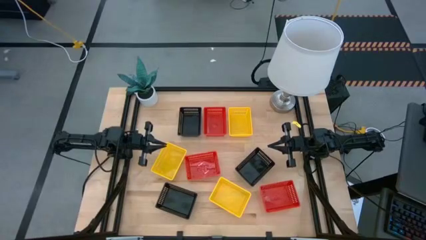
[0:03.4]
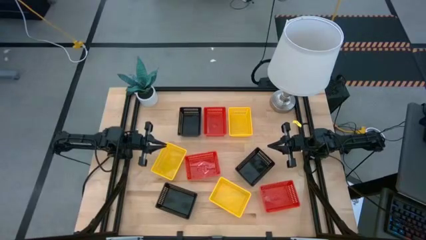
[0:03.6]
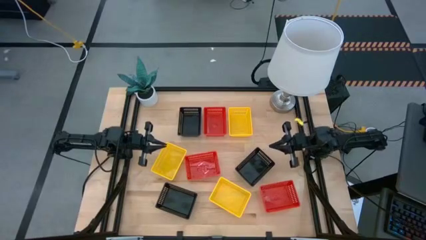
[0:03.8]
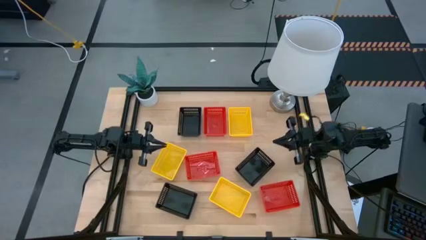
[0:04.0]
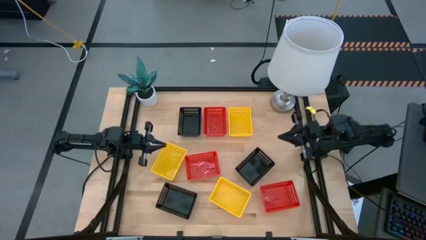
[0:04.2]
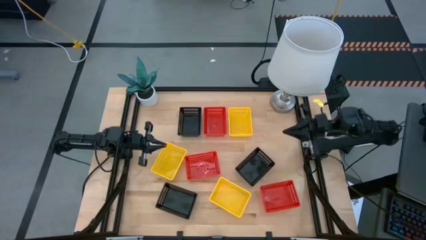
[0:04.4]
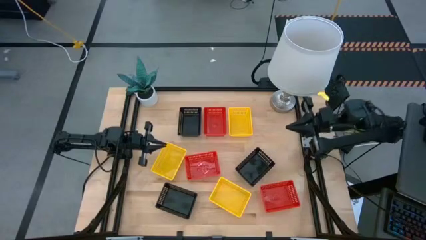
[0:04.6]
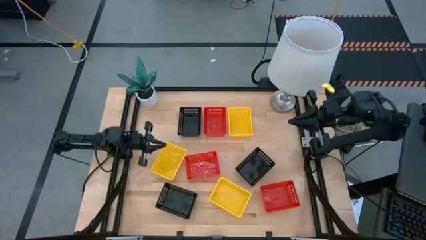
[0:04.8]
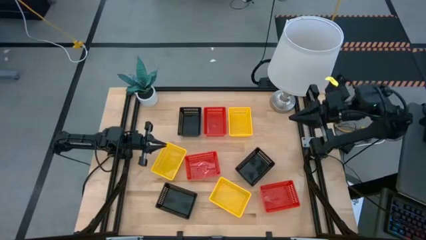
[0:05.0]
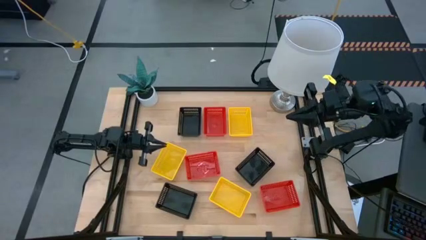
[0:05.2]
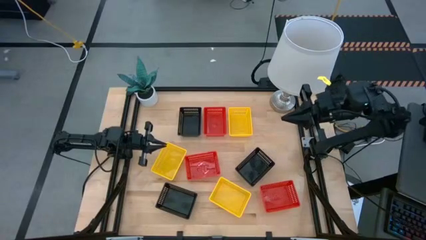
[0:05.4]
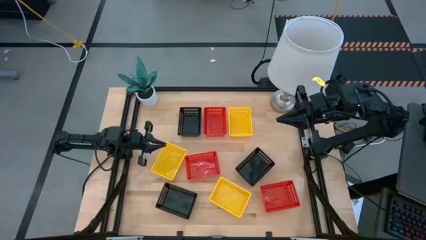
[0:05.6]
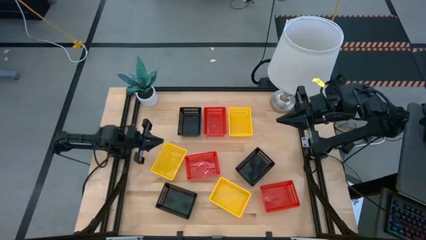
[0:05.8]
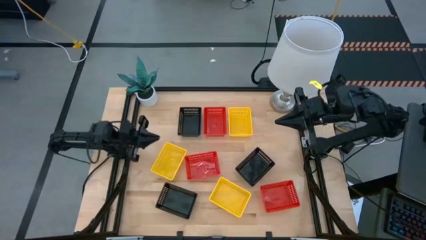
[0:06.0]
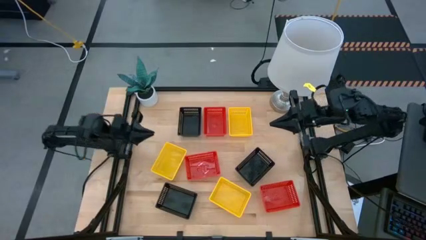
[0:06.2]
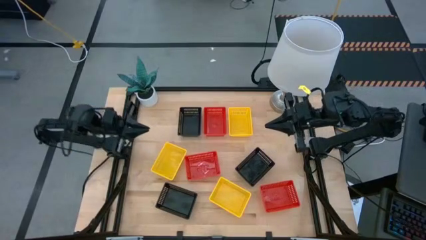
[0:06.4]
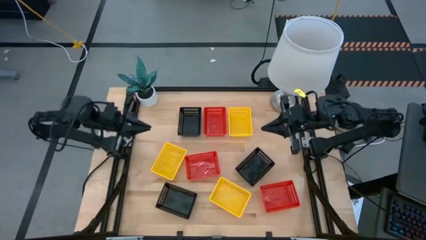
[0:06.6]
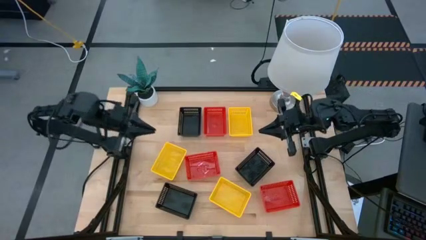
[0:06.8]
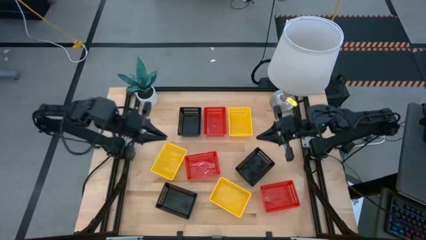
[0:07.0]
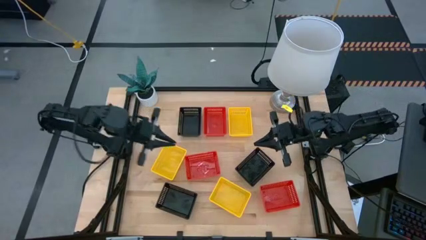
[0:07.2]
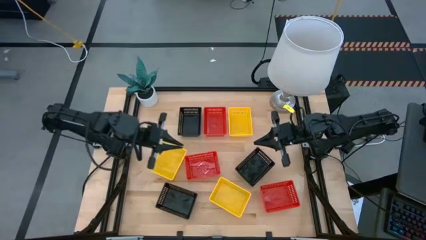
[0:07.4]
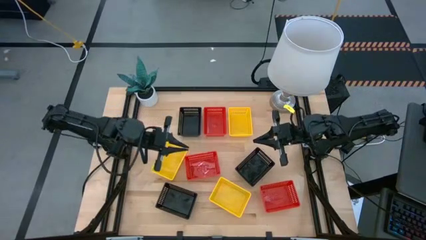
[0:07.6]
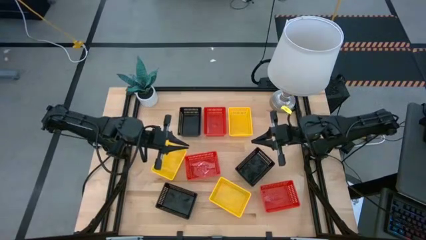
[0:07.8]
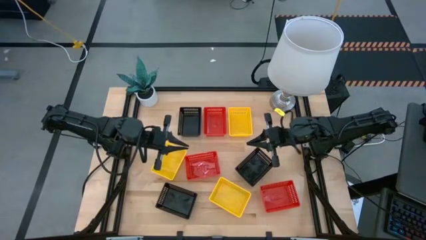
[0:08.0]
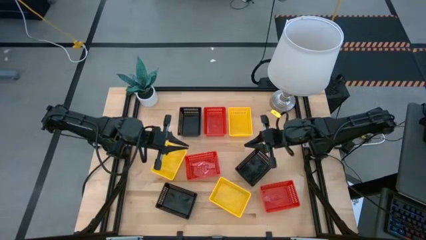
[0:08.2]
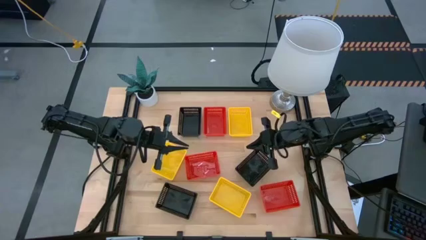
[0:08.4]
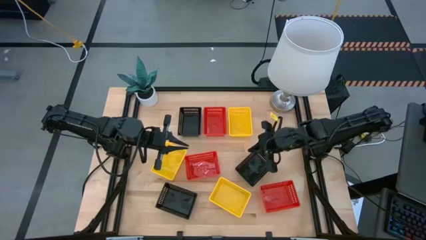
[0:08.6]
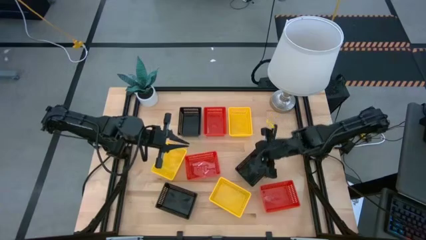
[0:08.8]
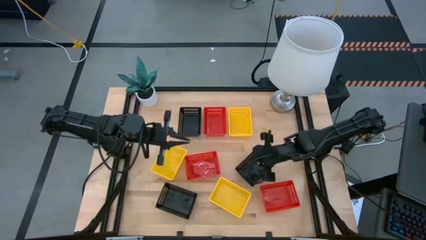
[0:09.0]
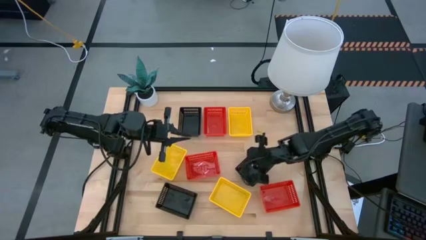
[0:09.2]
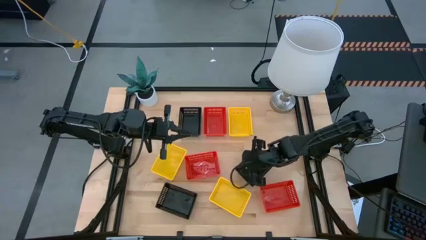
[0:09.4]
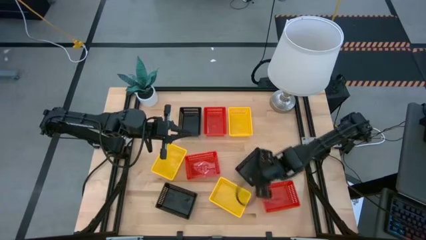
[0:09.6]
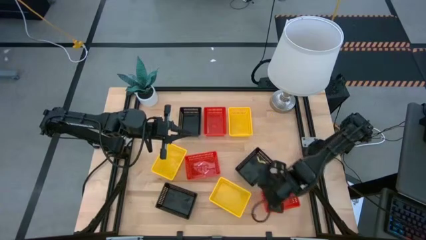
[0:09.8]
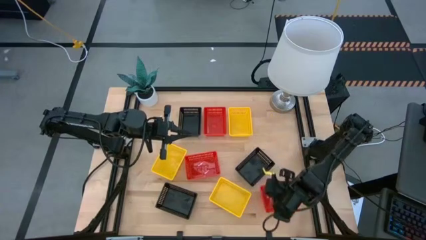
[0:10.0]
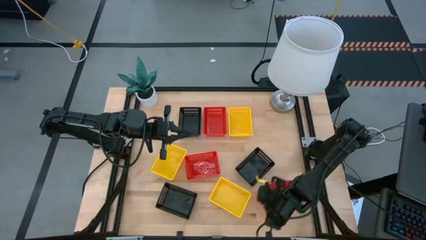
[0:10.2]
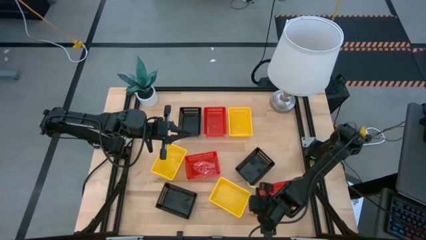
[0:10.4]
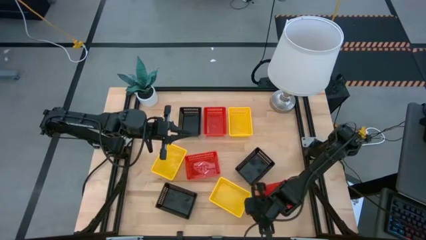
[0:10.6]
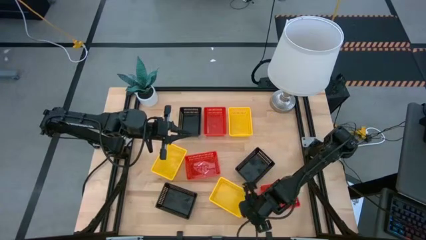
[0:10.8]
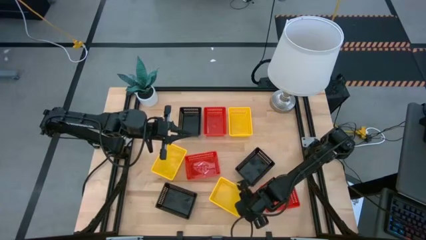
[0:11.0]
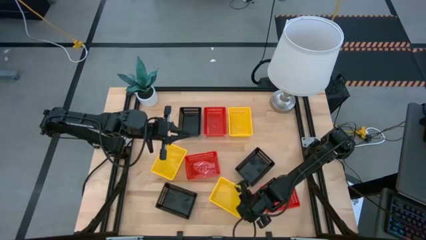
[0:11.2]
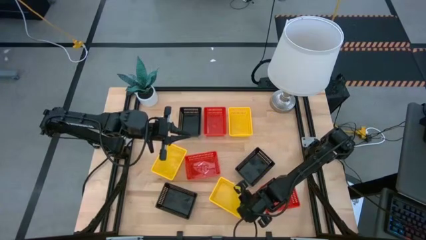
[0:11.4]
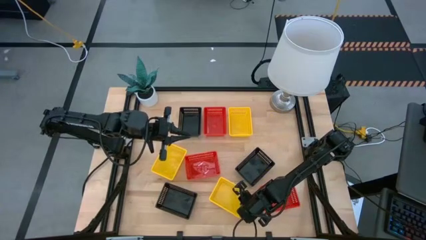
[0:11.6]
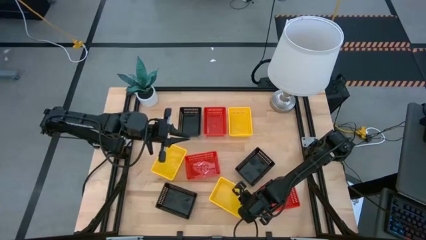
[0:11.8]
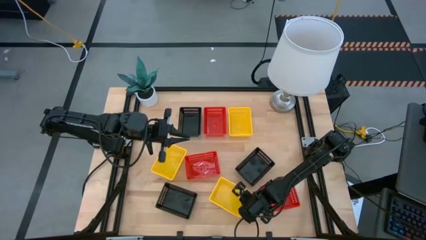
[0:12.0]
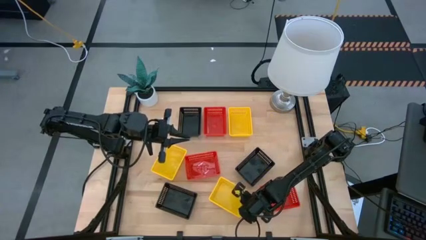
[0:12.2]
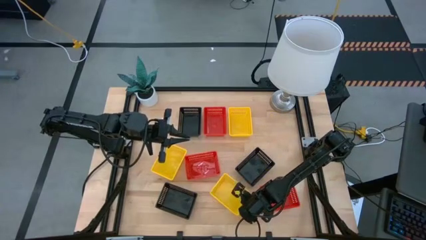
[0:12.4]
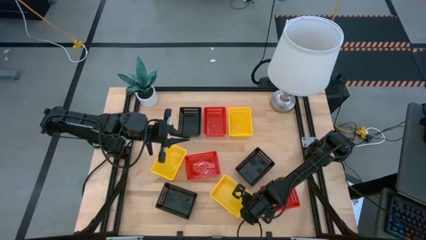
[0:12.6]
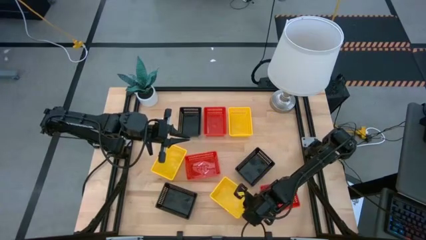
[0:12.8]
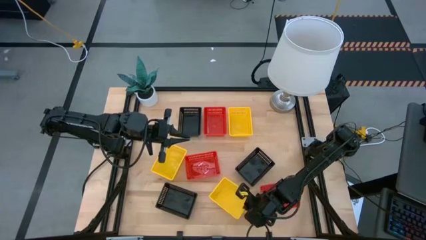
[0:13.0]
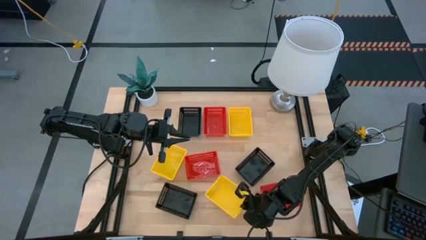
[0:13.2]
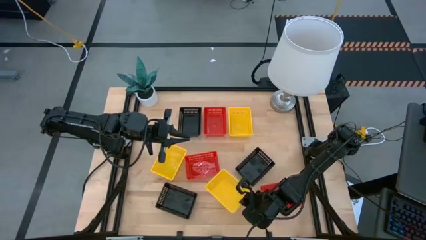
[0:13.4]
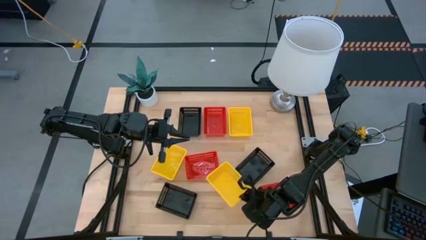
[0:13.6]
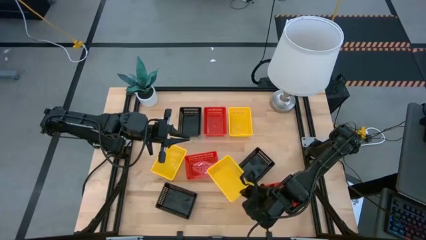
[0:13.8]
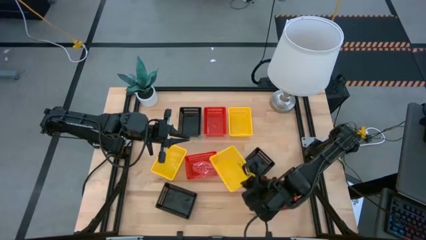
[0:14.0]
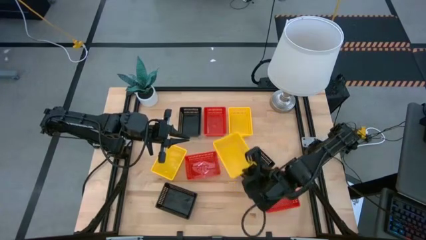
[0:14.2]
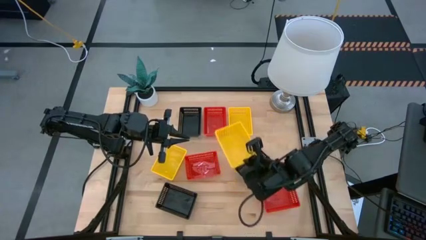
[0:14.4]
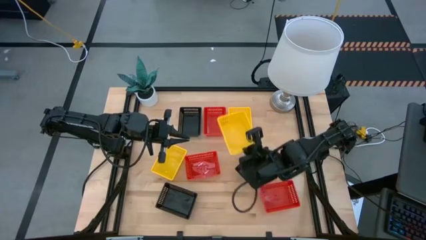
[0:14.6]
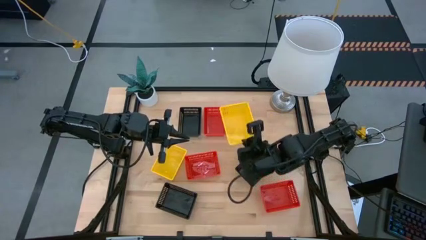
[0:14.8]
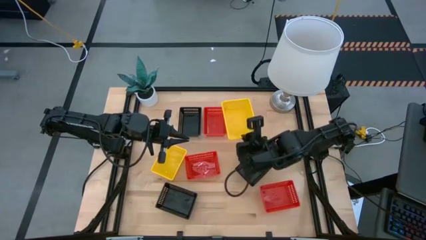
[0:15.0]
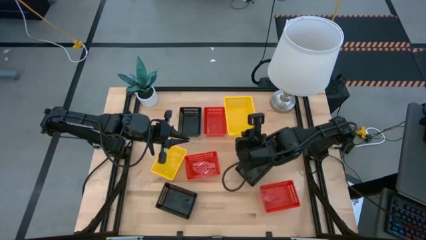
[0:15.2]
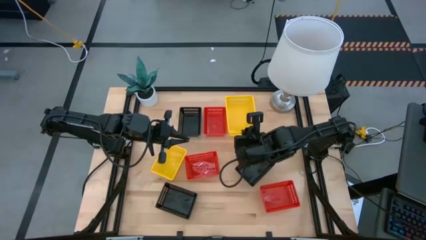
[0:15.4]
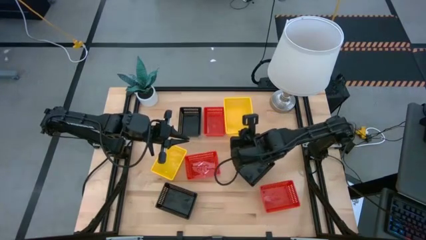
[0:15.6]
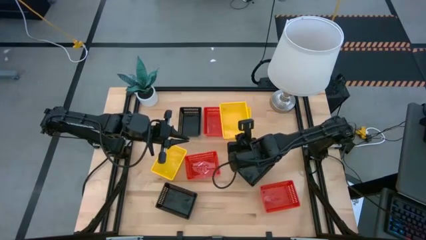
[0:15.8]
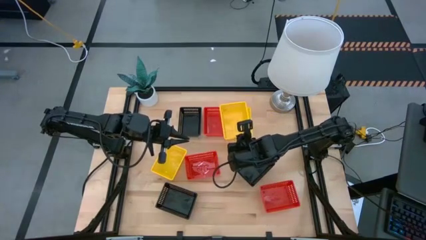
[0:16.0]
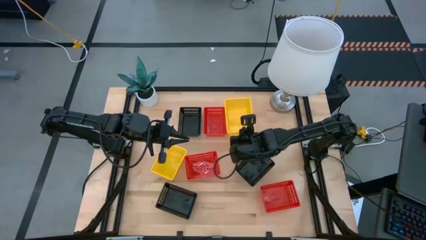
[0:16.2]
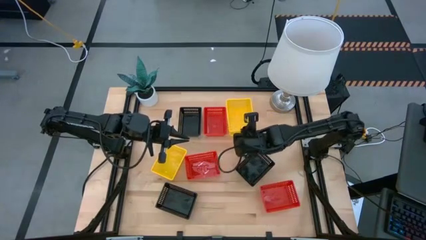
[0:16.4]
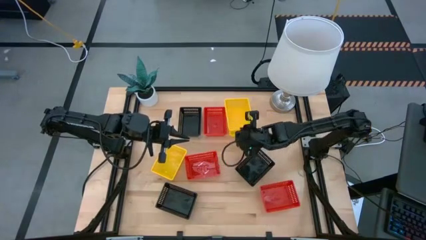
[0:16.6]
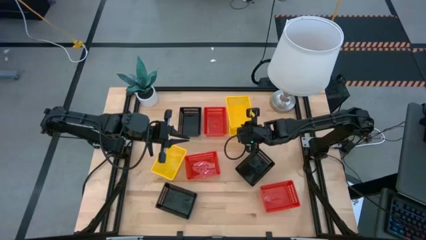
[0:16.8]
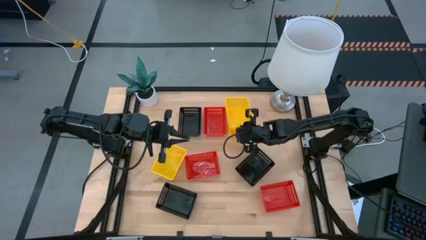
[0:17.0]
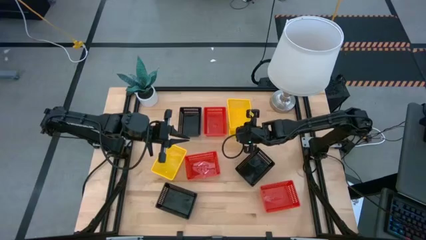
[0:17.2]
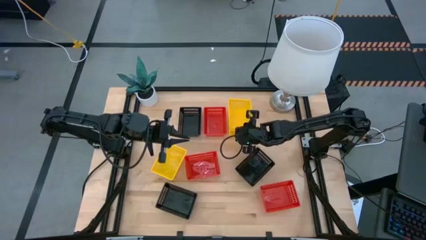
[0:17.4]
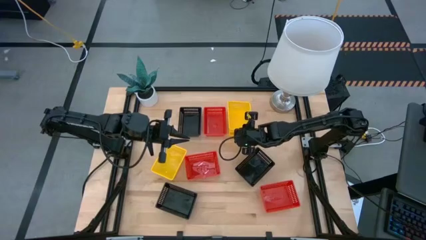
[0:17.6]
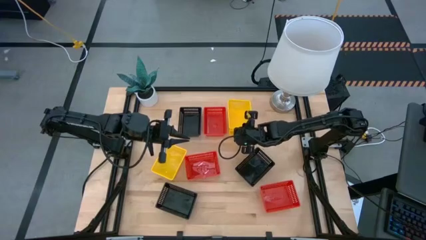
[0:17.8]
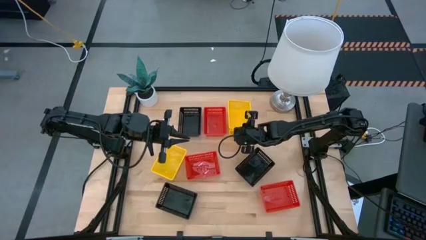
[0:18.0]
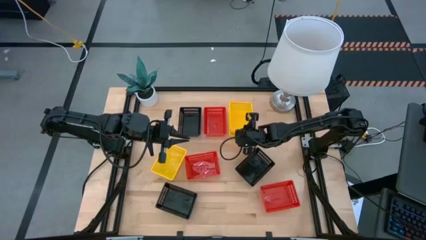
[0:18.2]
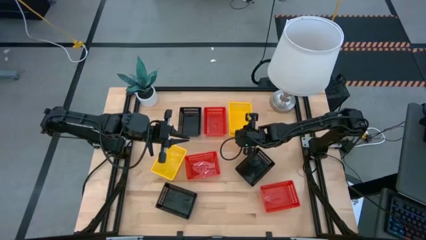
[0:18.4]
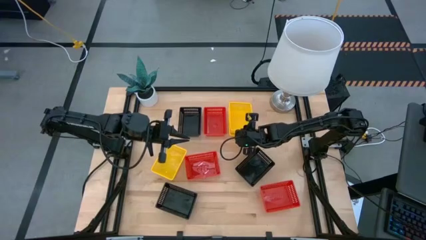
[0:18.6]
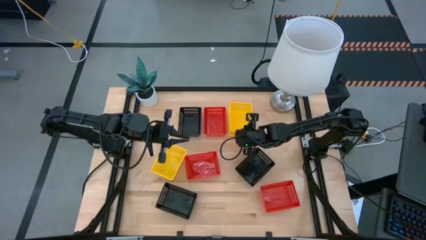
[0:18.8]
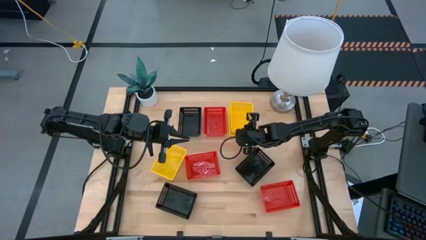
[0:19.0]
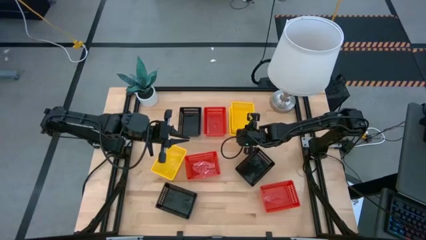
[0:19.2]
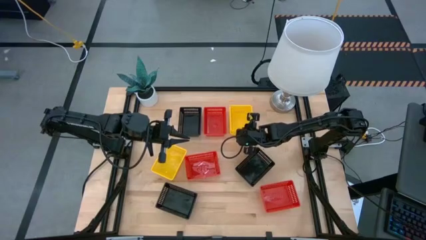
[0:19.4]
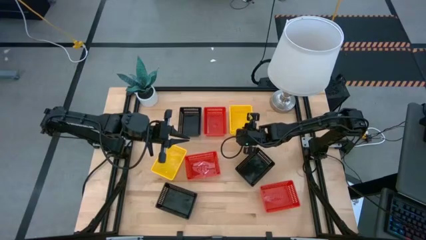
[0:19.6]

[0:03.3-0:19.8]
Stack the bottom right yellow bin on the top right yellow bin
